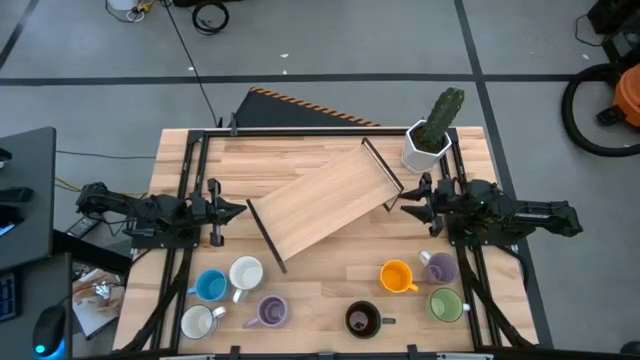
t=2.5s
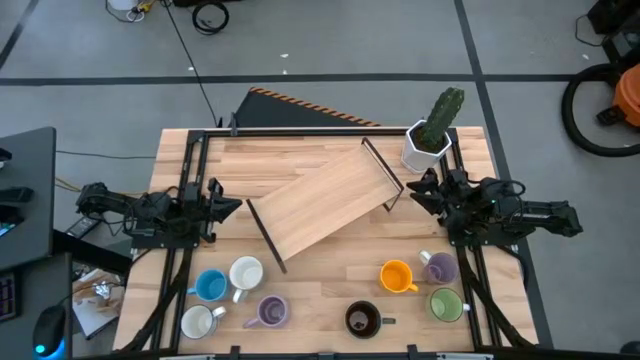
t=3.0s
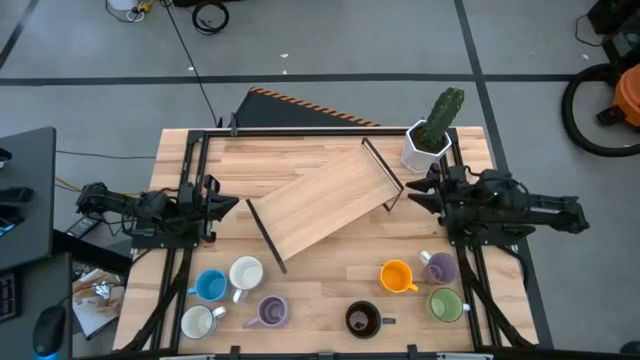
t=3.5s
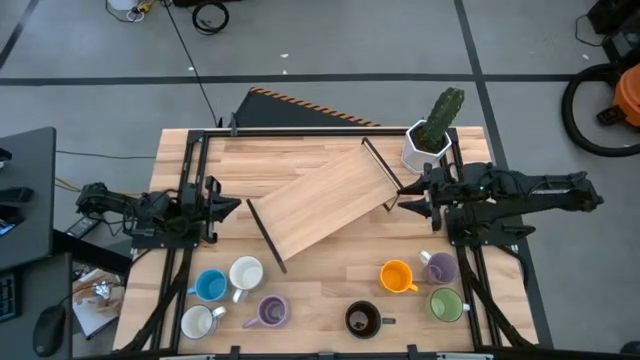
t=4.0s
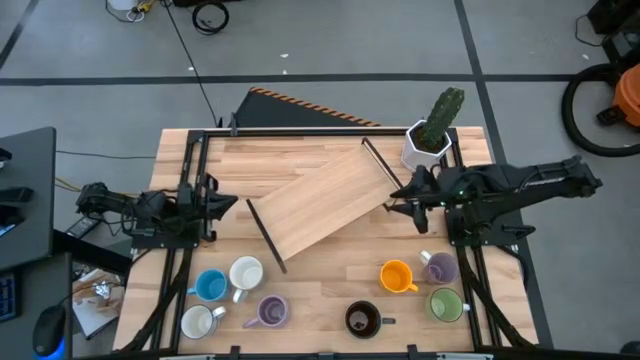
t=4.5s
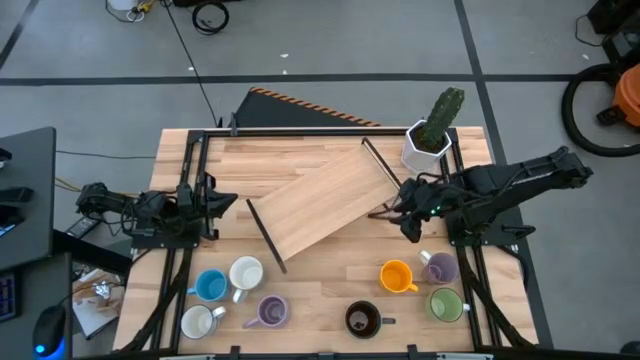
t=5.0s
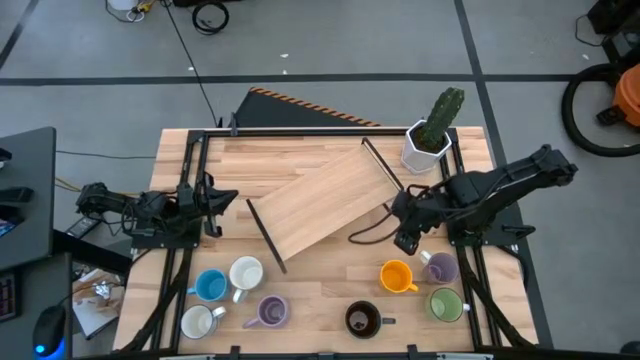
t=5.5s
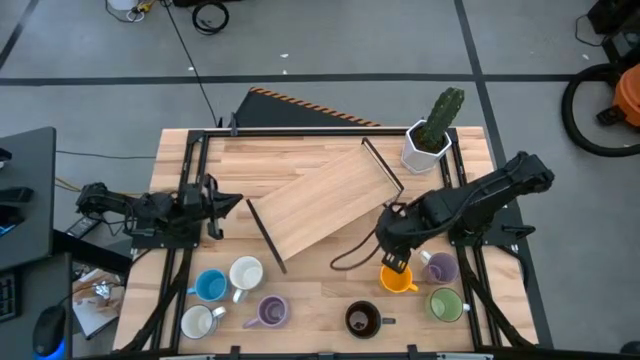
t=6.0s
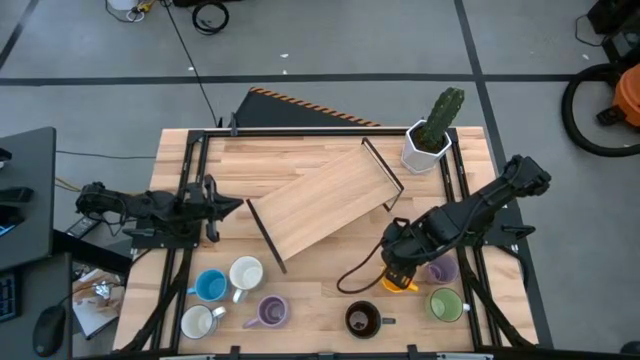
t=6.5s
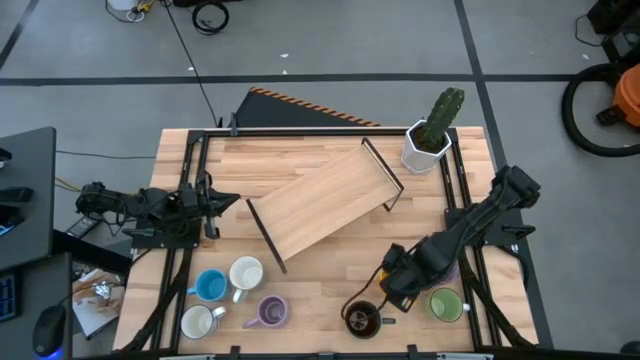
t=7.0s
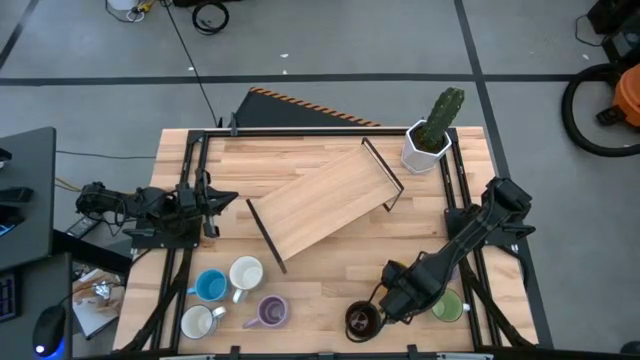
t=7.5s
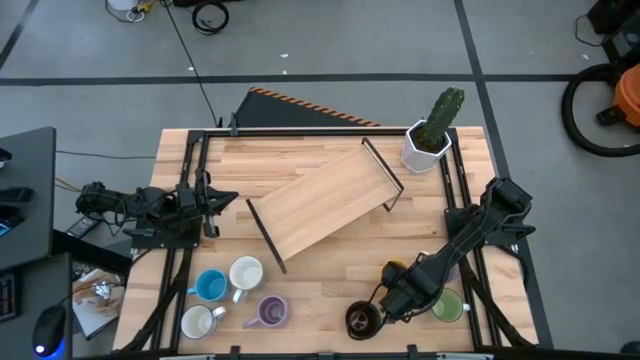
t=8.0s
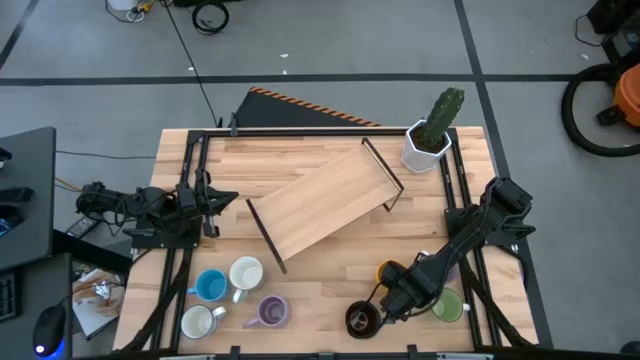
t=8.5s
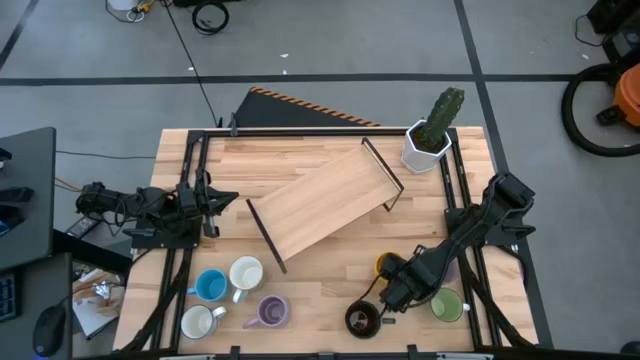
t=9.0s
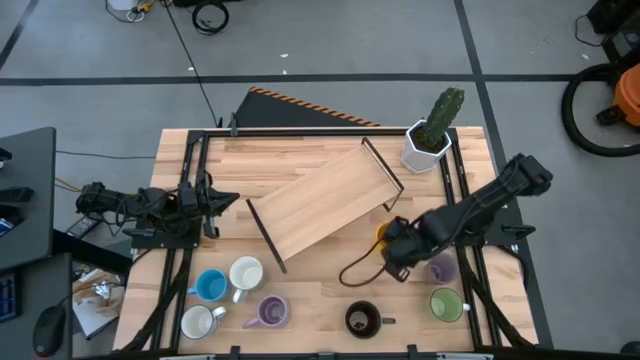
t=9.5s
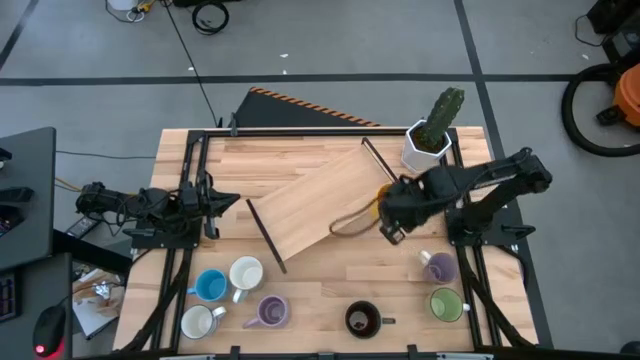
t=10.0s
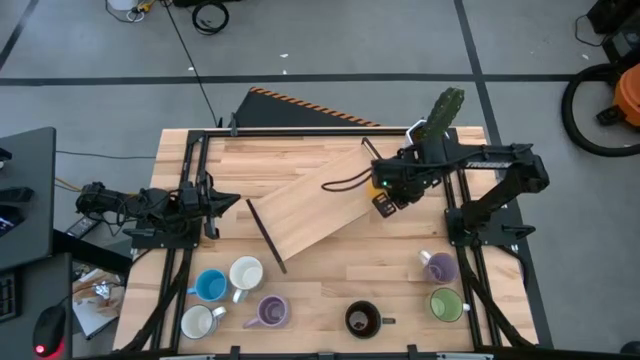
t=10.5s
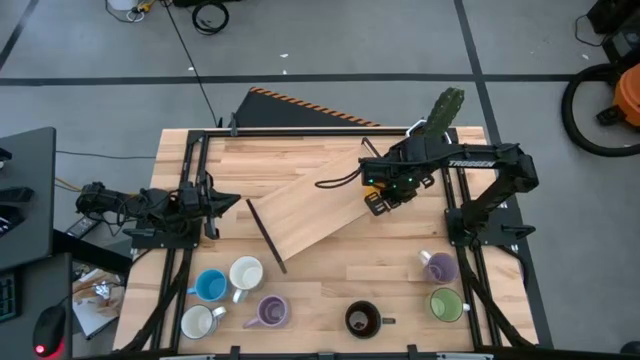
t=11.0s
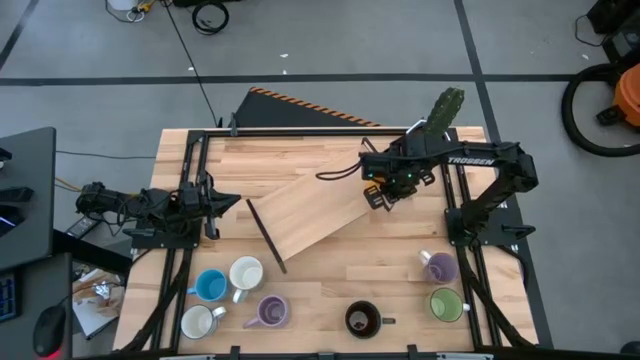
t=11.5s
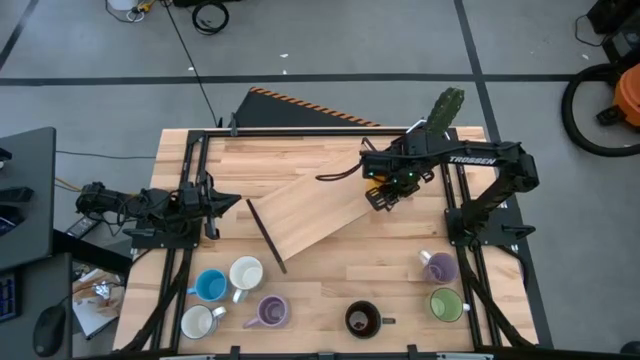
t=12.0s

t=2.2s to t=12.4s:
Task: Place coffee mugs
Put the yellow mug on the shelf

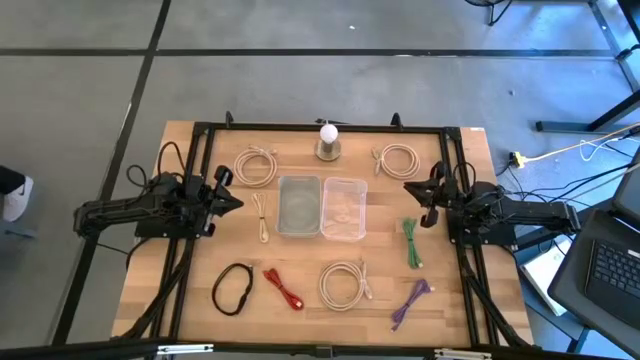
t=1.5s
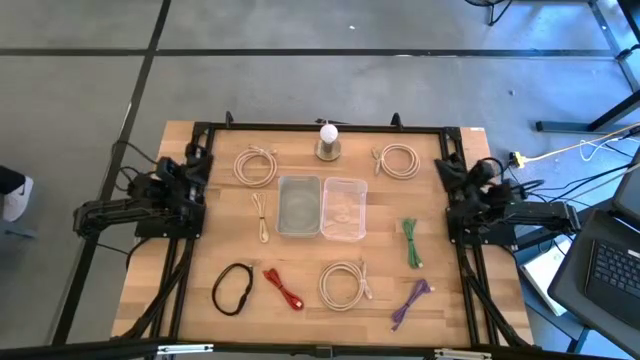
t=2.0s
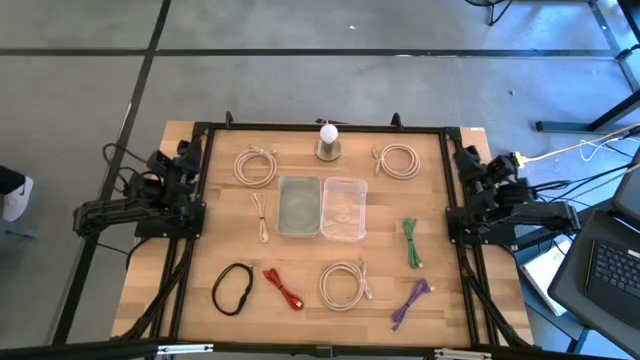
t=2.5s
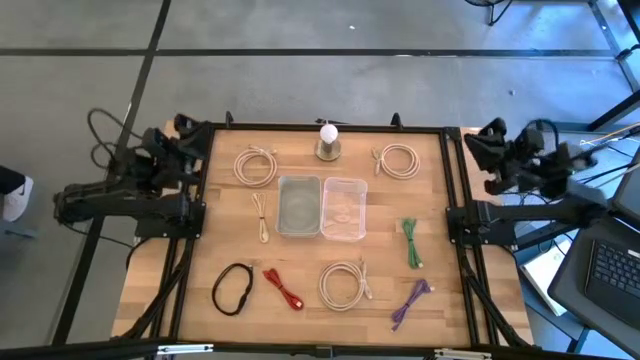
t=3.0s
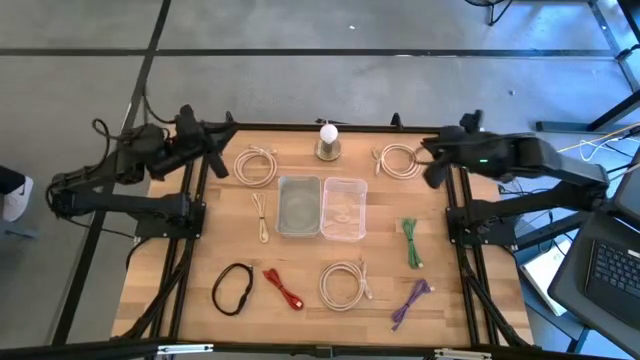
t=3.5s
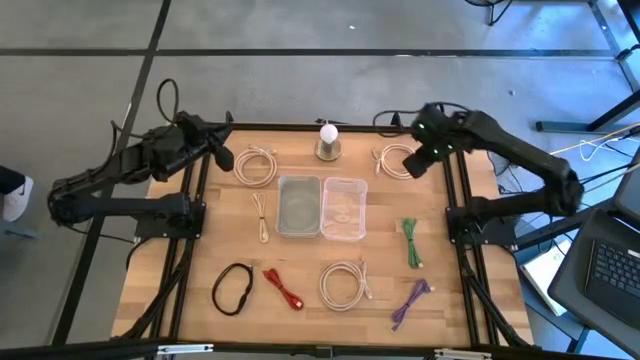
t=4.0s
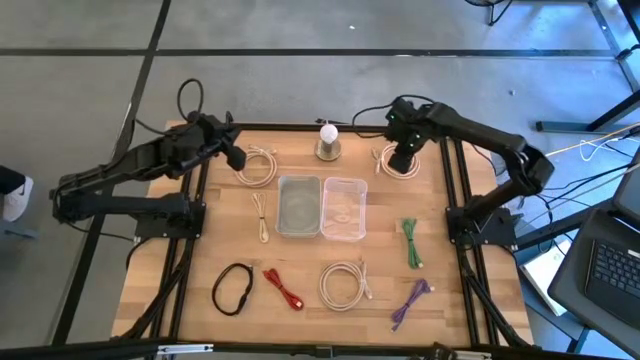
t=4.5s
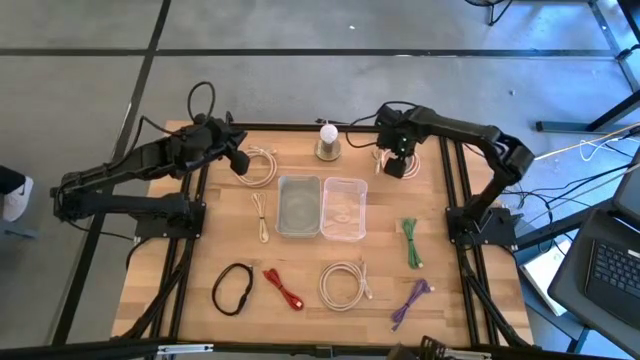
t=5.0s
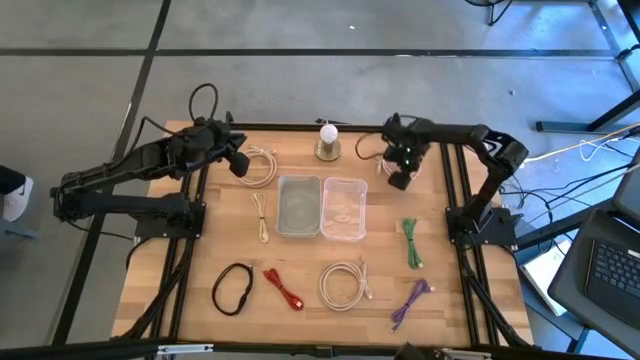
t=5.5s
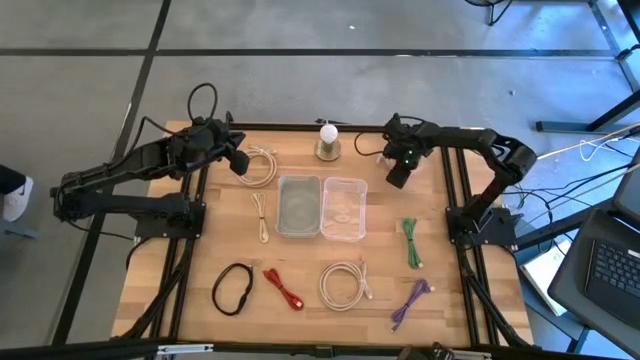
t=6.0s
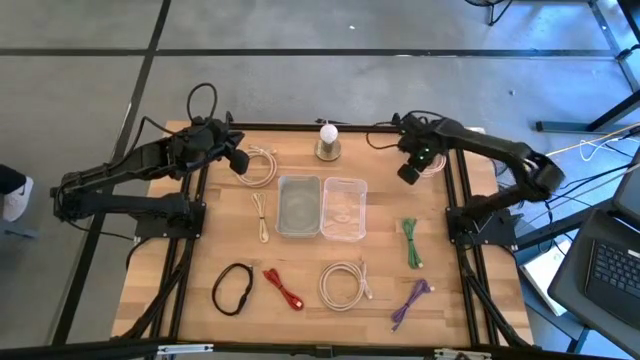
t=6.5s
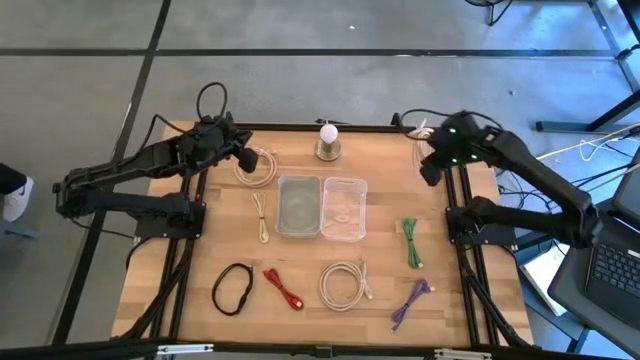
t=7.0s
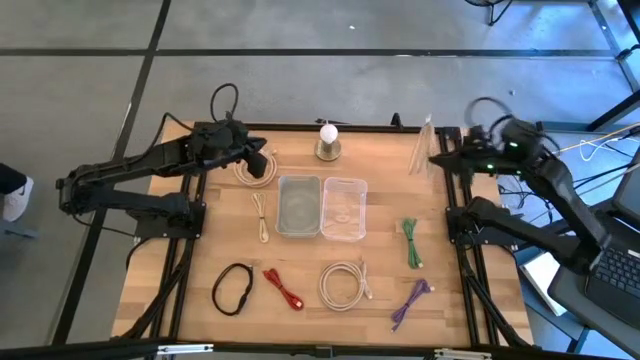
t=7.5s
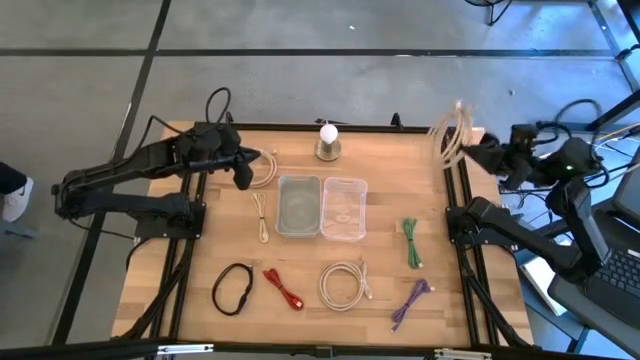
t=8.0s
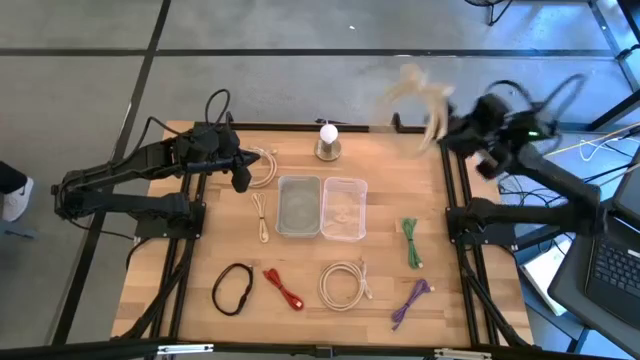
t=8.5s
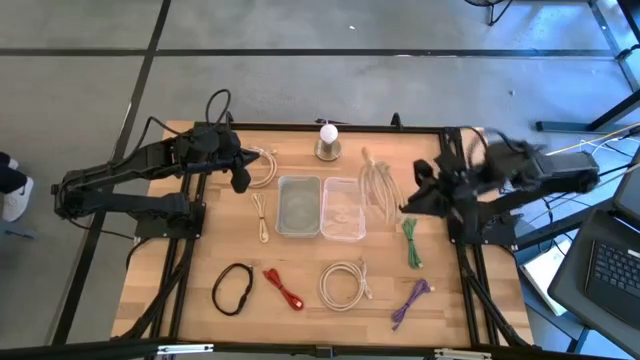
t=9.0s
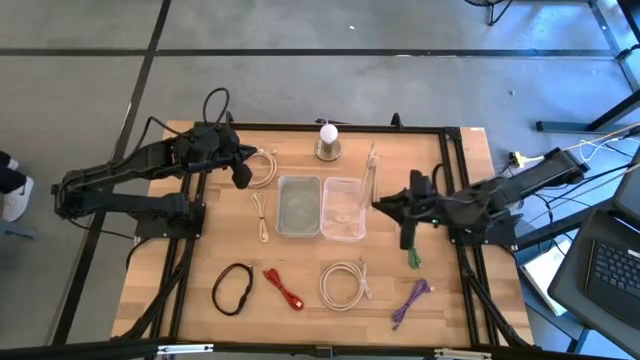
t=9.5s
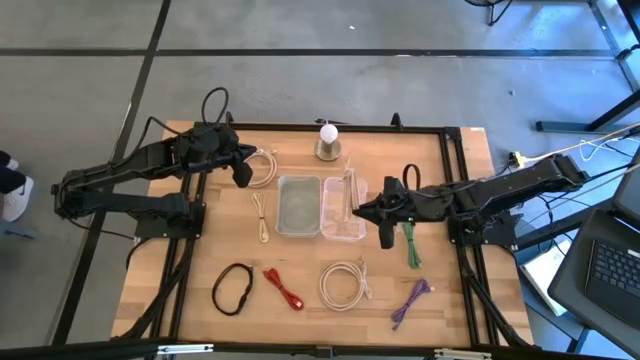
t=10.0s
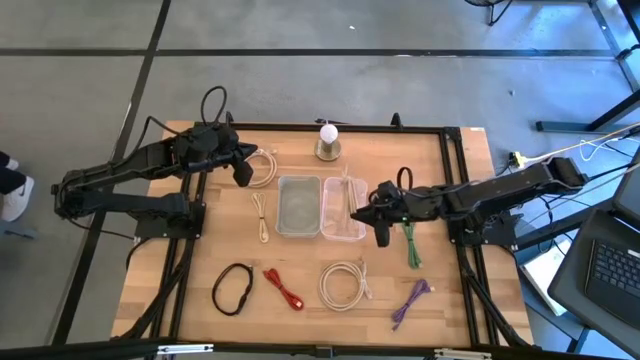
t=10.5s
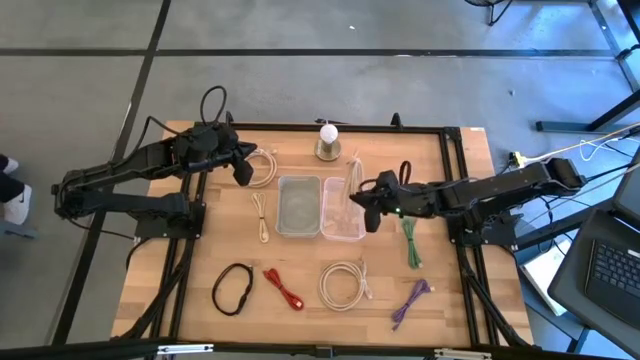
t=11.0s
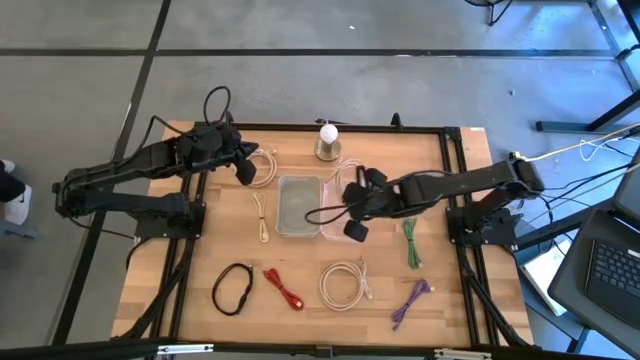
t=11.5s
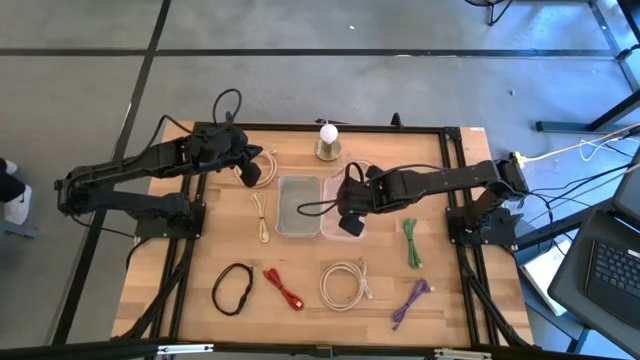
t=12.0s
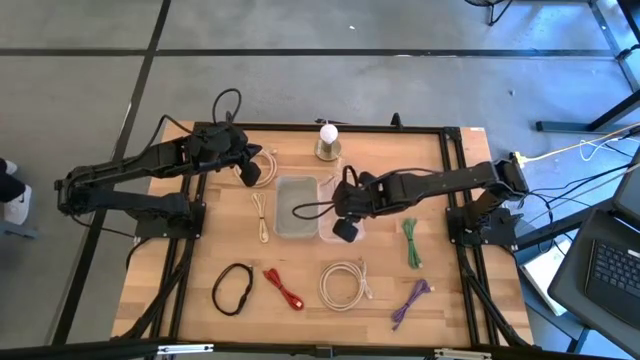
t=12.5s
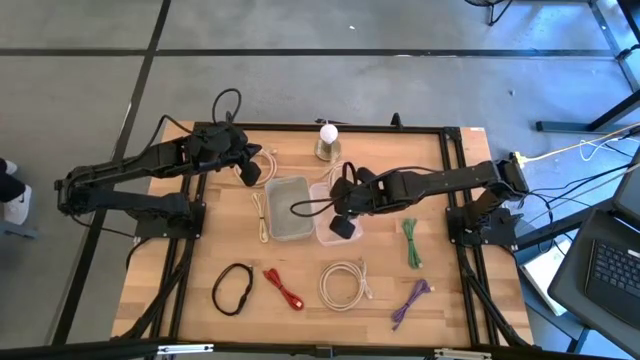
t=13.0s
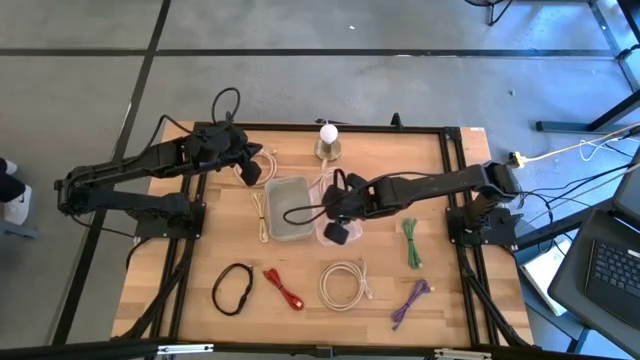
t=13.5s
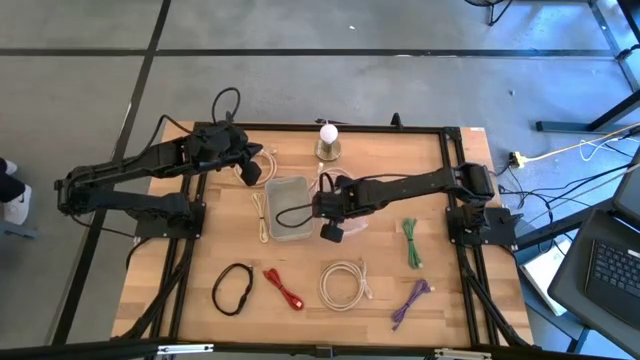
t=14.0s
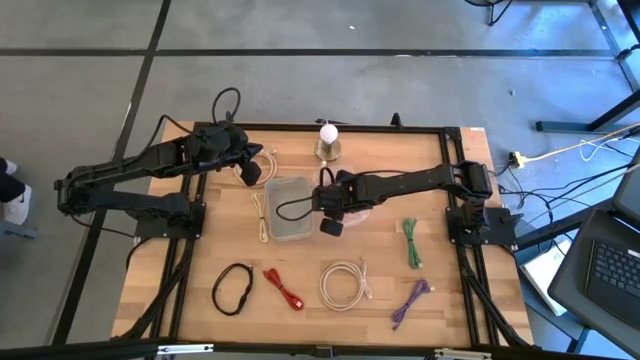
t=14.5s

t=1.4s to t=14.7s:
Task: Pick and place USB-C Cables
Put the top right white usb cable into the transparent bin
